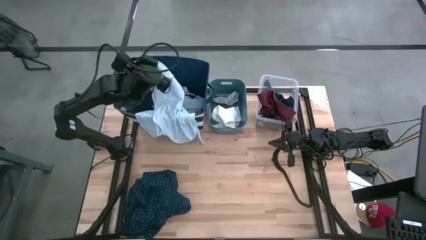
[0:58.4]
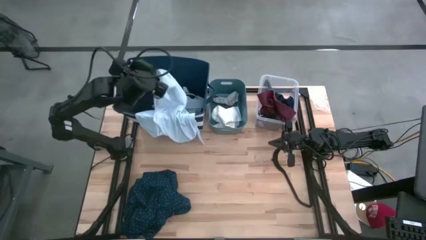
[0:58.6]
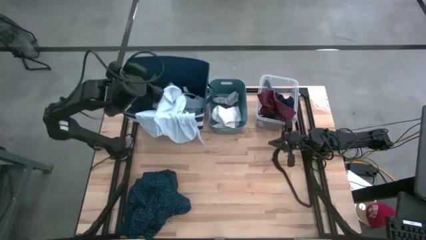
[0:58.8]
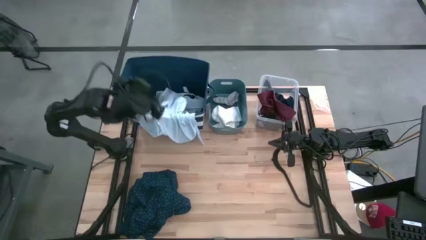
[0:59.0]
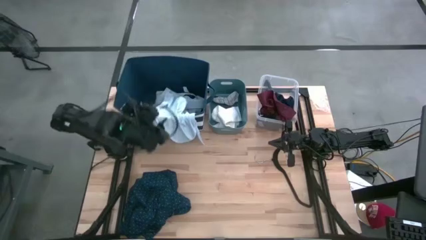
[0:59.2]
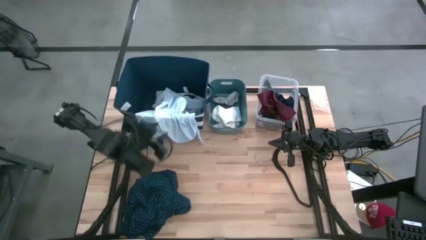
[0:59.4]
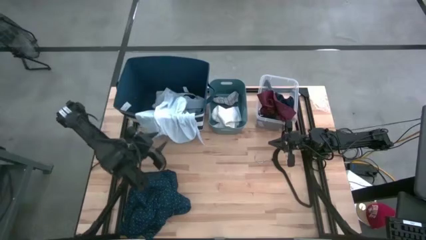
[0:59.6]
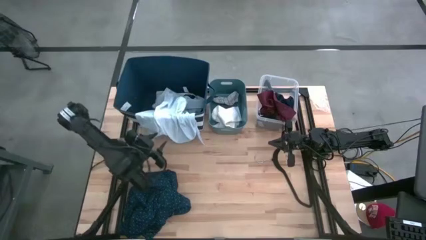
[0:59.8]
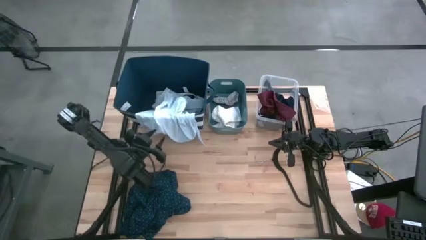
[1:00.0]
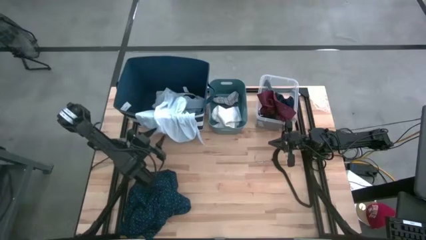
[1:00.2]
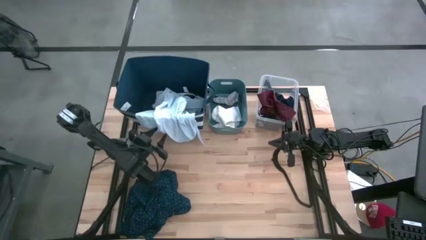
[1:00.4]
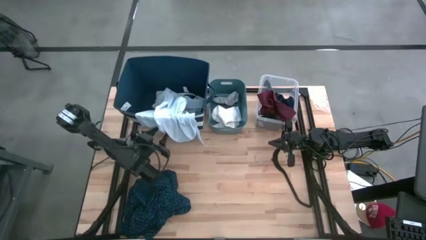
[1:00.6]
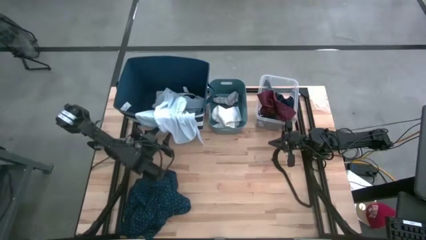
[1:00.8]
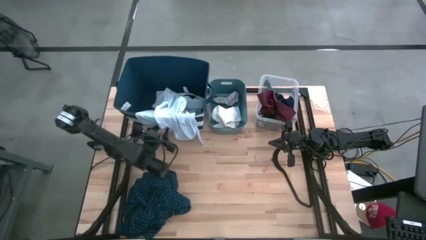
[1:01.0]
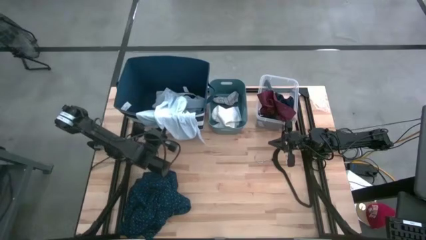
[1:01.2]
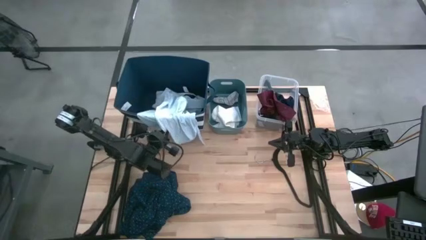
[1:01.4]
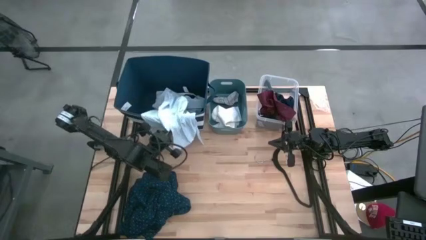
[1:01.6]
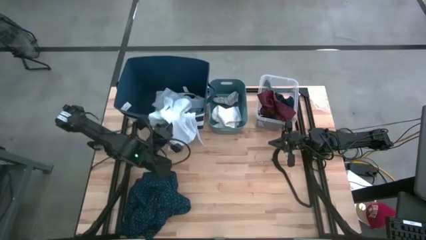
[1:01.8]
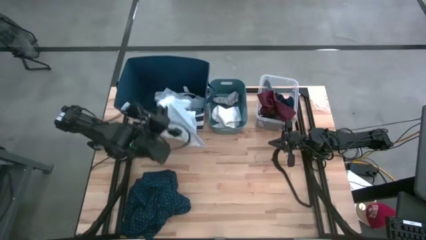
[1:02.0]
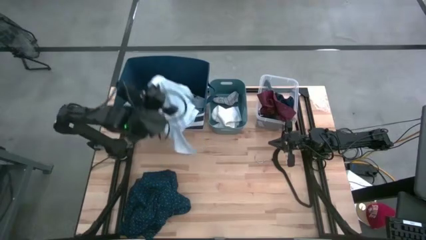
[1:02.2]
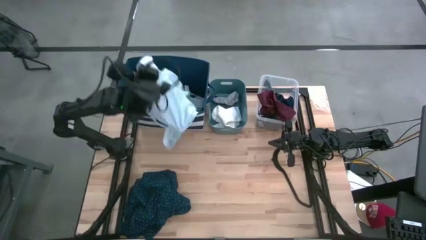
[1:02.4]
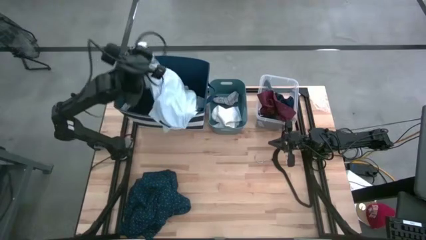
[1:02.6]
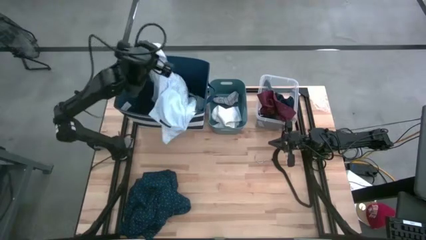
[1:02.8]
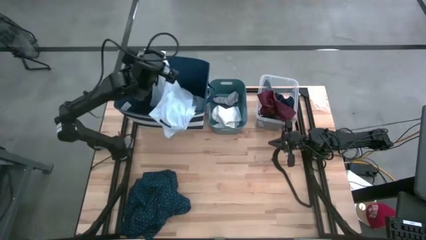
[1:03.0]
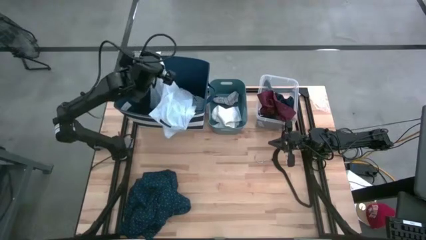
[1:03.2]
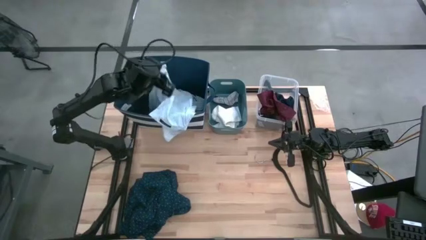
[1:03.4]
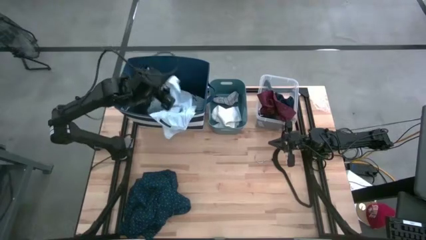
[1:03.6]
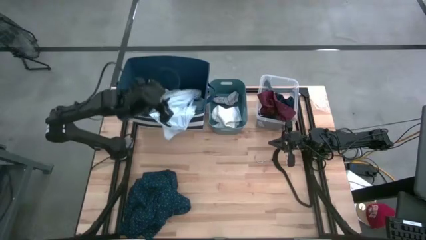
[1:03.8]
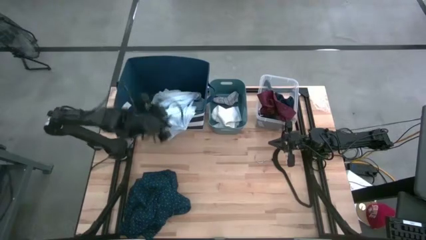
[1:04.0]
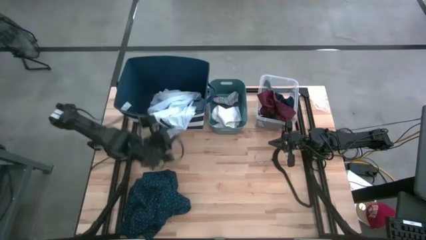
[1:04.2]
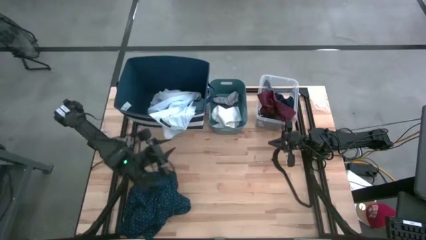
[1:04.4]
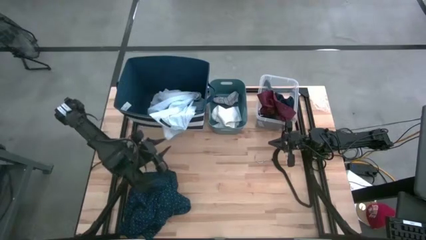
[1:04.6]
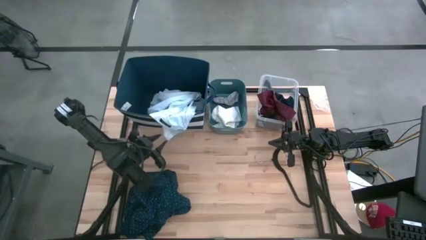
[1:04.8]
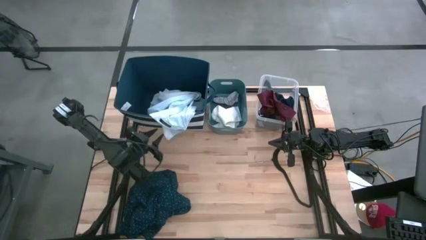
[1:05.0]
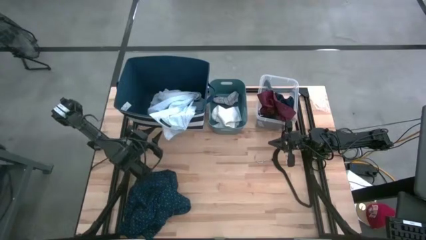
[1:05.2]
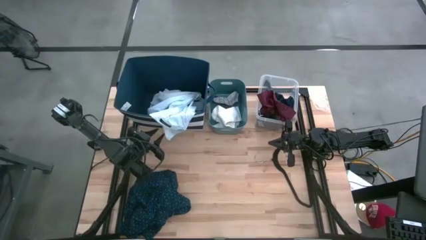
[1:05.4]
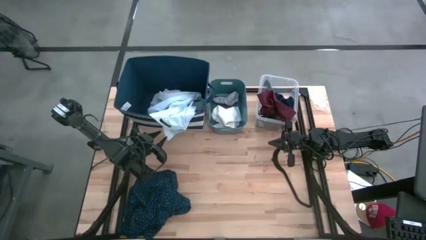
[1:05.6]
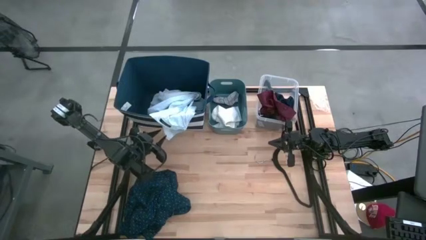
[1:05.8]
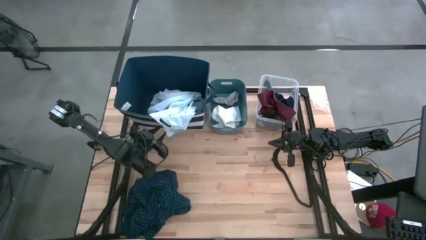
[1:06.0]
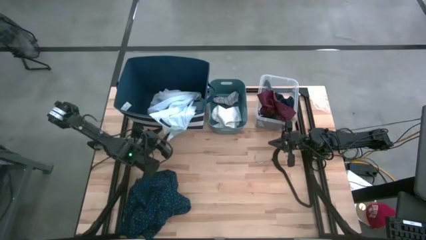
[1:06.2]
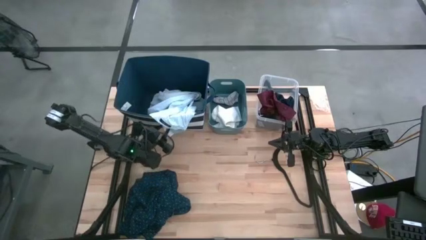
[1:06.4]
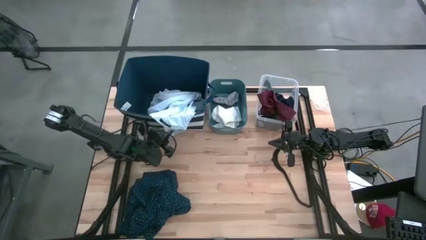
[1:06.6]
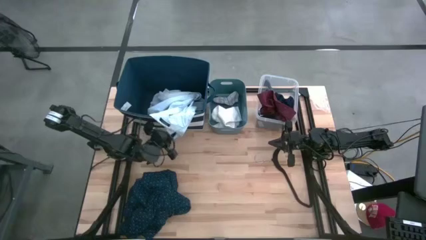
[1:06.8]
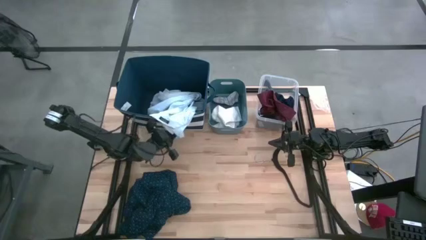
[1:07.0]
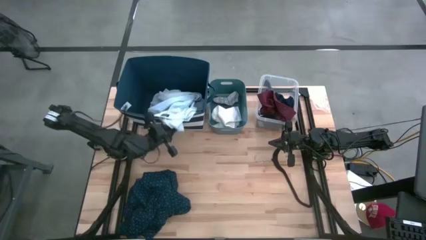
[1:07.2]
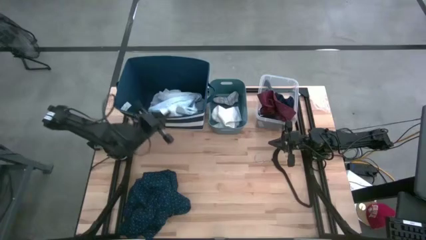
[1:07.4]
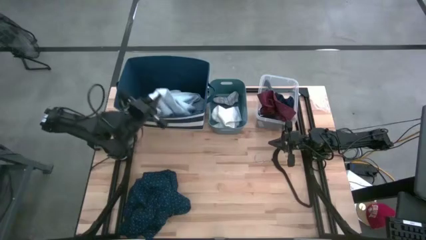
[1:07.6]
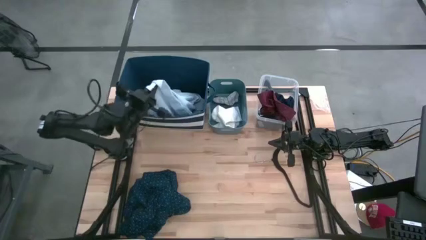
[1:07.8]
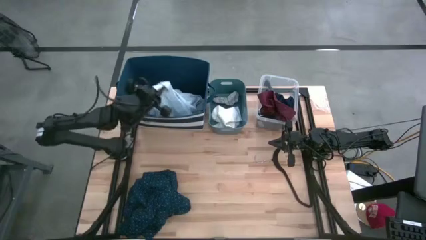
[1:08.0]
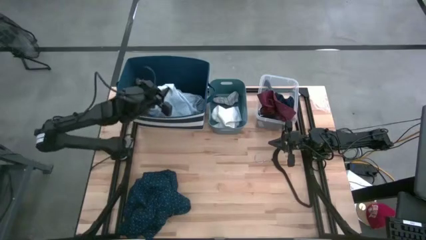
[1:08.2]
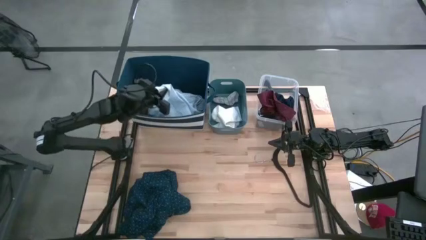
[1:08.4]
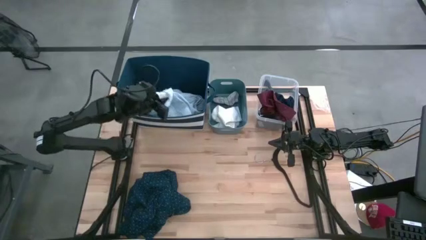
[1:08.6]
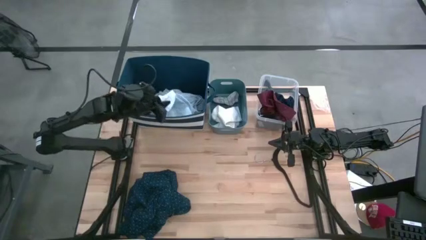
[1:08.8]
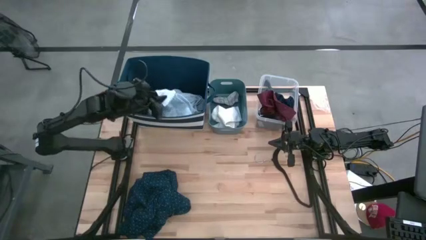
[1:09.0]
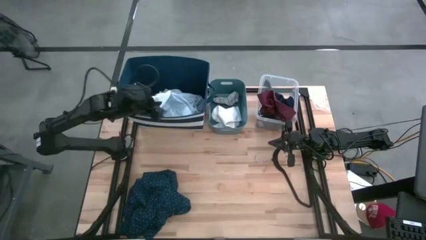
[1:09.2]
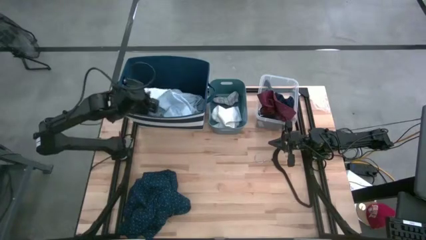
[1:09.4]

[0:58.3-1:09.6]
Task: Pick & Place Cloths
Put the light blue polo shirt into the blue bin

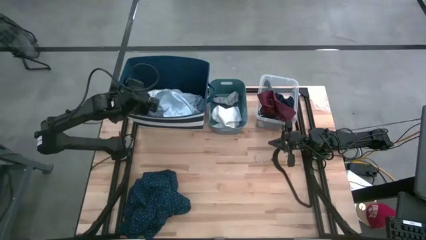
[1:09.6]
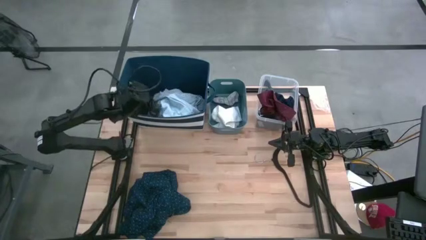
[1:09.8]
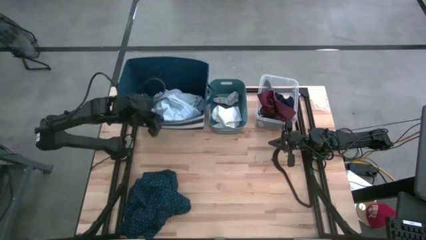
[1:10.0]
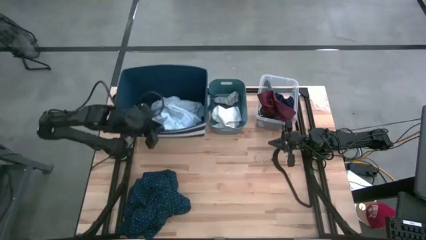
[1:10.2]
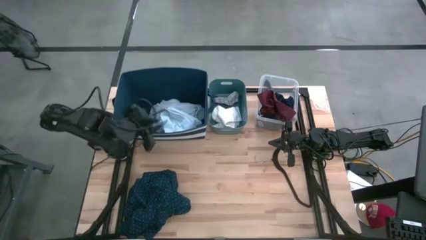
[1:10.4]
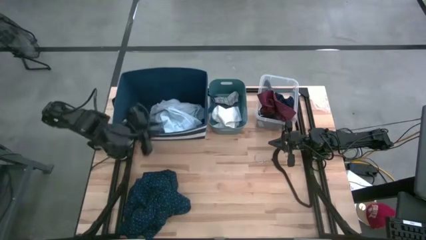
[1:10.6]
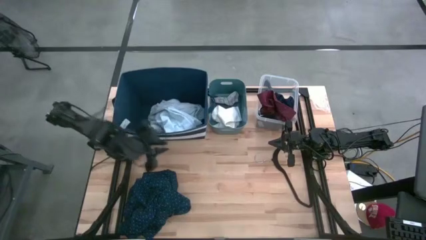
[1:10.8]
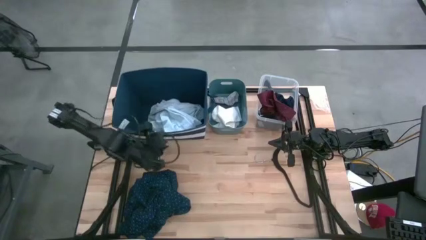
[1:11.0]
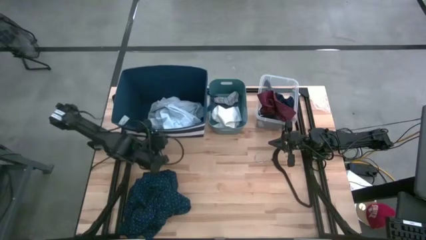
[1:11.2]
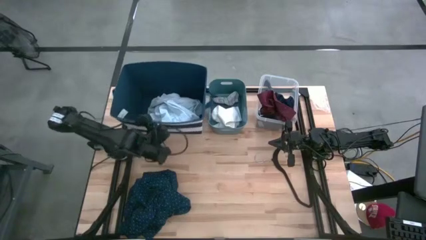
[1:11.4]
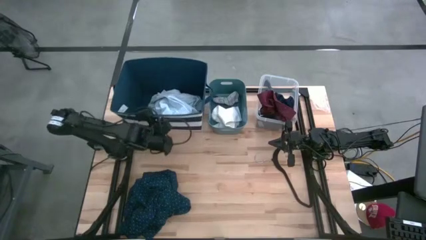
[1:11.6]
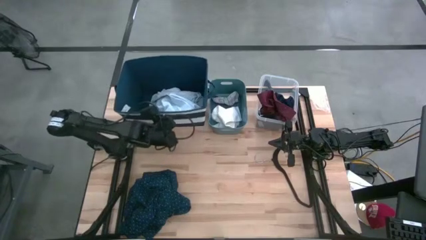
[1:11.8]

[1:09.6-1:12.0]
Adjust the blue bin

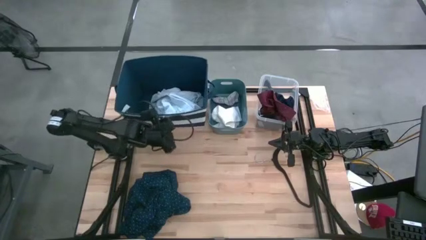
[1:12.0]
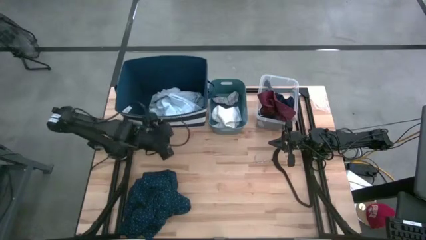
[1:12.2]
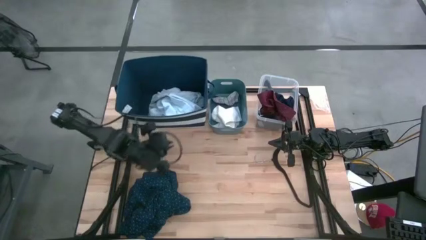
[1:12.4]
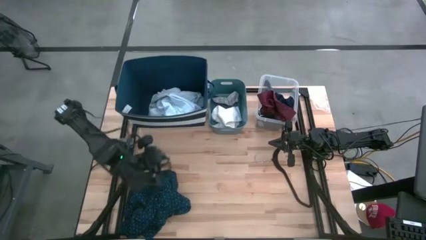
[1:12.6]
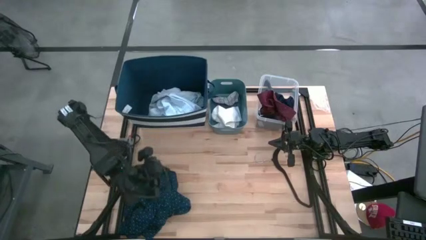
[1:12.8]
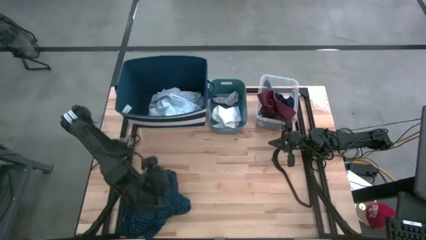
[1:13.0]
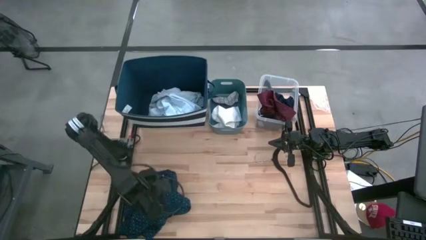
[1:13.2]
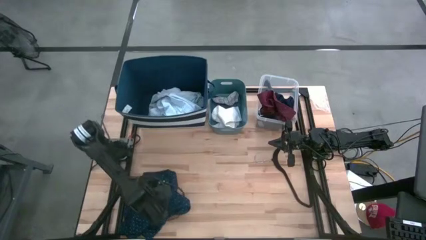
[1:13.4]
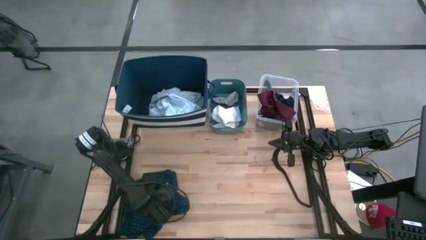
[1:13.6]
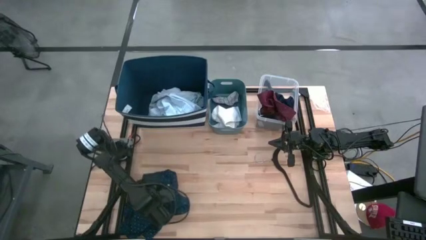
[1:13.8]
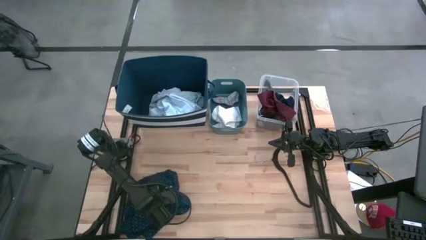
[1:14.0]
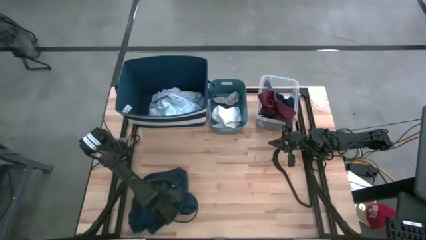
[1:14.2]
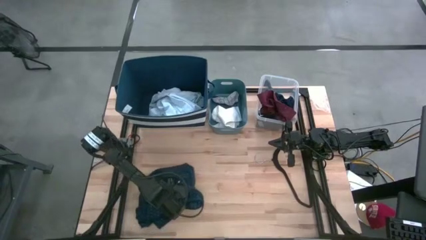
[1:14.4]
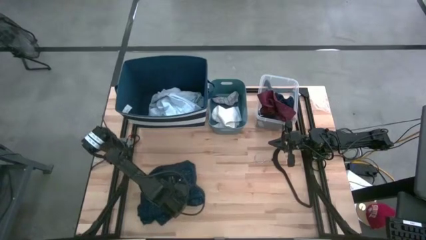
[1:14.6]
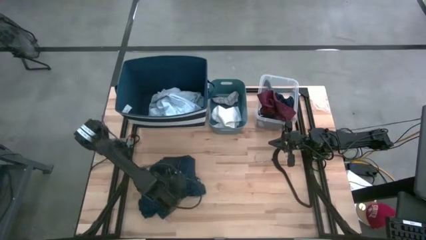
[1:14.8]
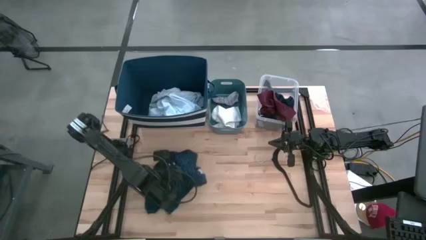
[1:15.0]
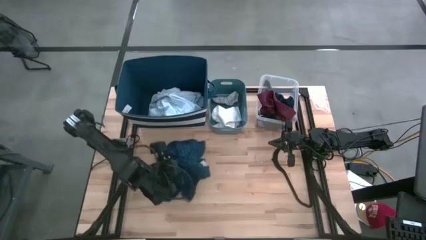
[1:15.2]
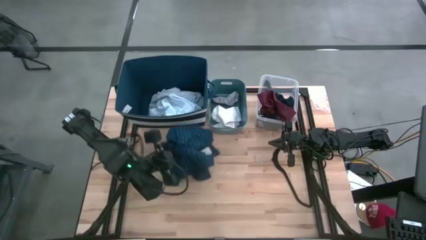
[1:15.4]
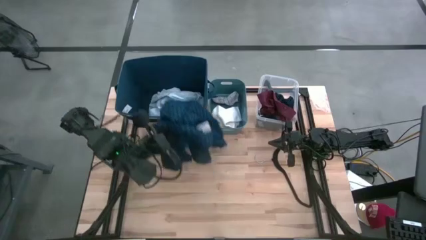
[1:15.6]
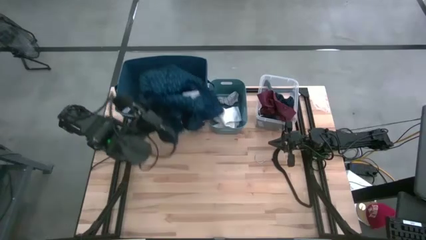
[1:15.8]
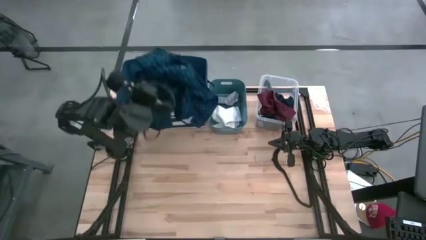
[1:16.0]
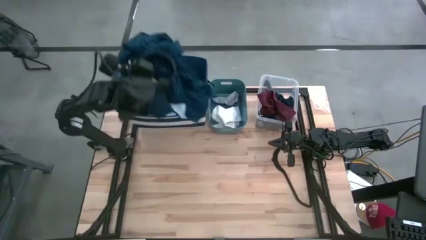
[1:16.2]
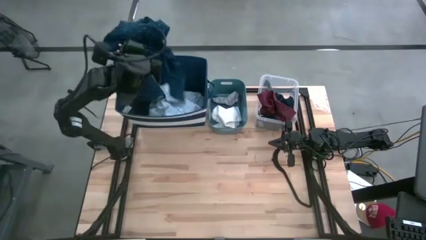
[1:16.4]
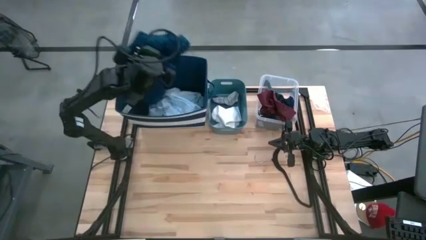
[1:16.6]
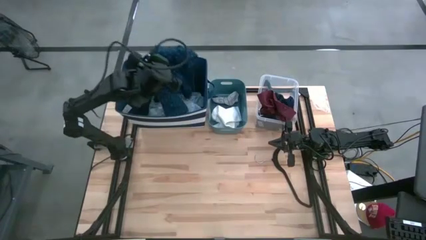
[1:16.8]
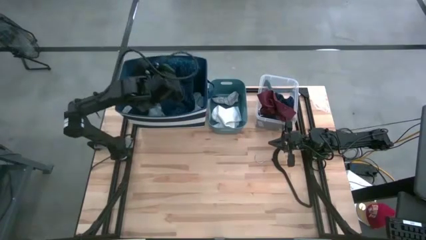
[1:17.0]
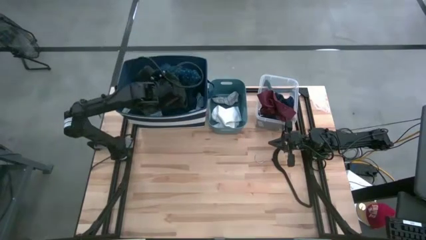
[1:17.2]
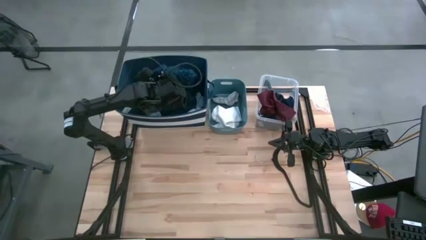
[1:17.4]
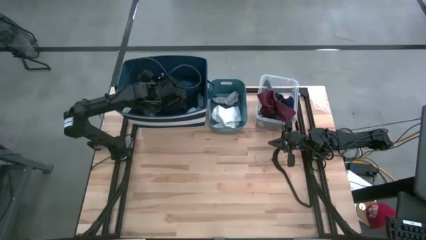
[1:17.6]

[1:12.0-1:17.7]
Put the dark blue polo shirt into the blue bin
